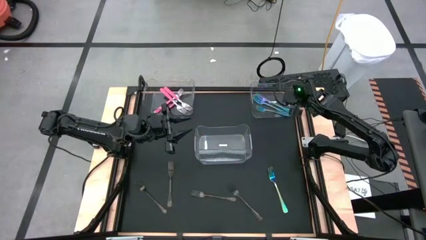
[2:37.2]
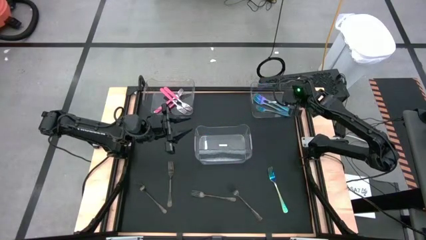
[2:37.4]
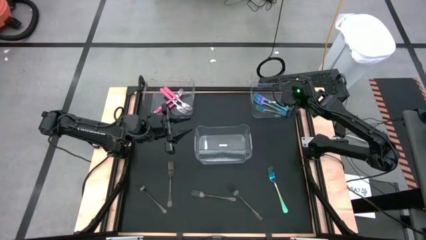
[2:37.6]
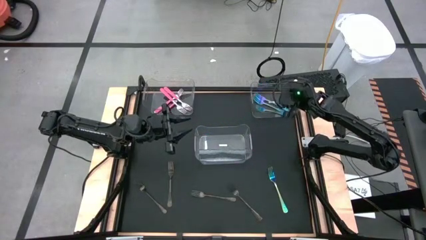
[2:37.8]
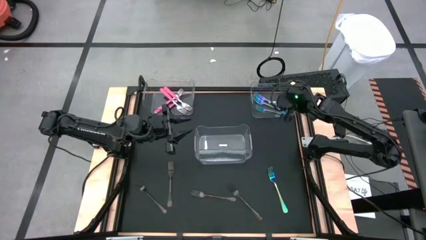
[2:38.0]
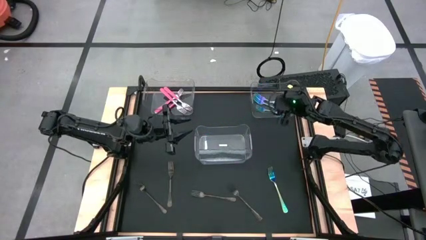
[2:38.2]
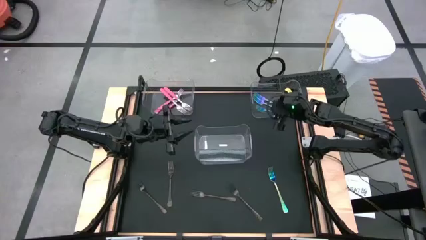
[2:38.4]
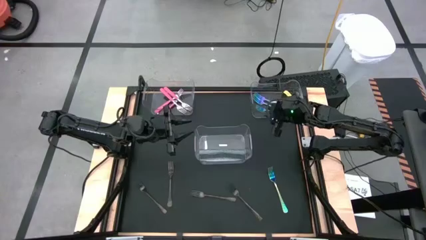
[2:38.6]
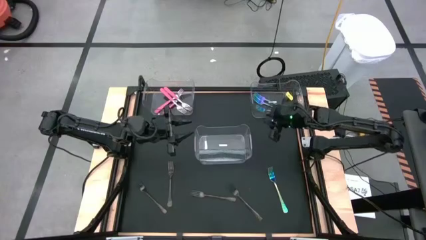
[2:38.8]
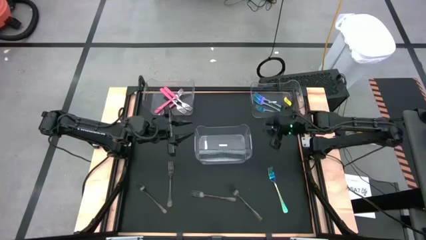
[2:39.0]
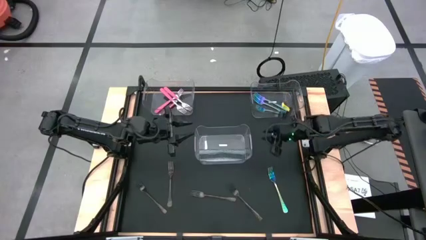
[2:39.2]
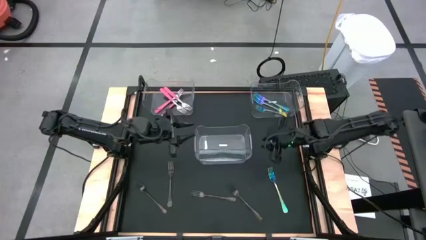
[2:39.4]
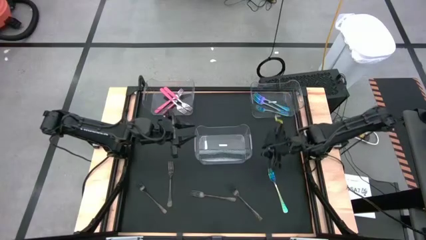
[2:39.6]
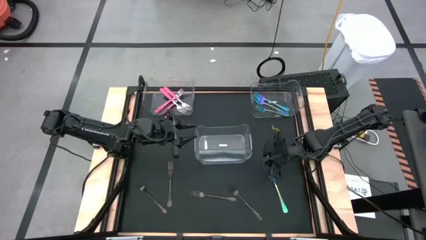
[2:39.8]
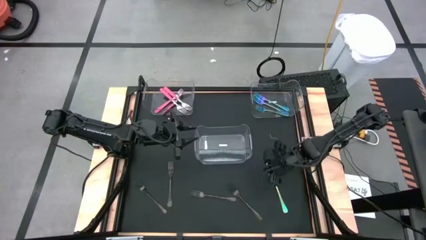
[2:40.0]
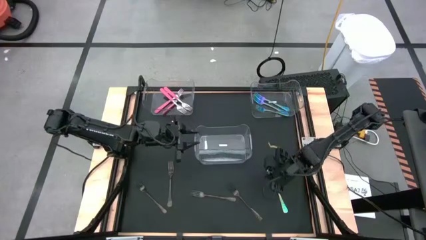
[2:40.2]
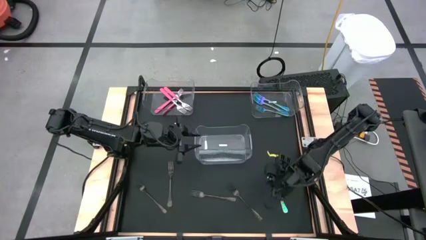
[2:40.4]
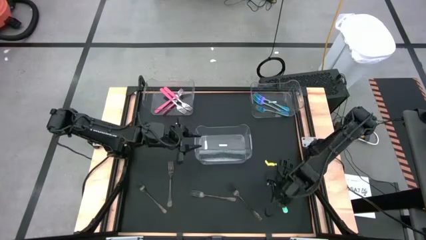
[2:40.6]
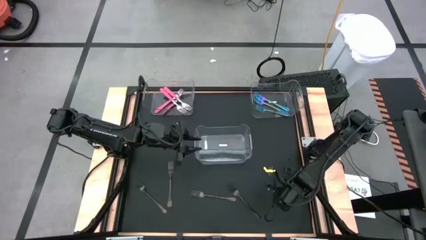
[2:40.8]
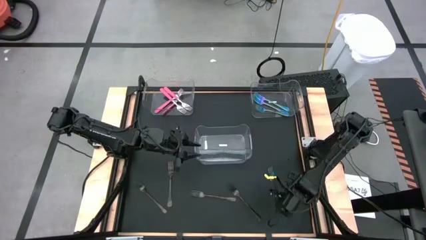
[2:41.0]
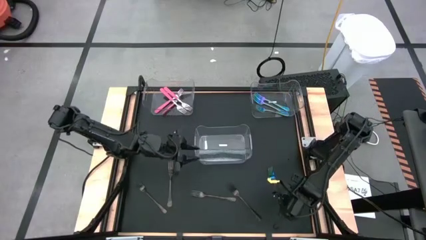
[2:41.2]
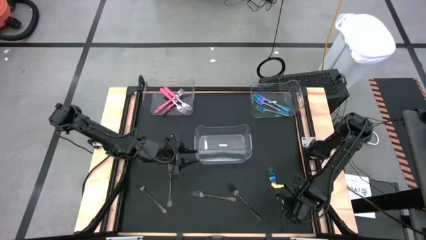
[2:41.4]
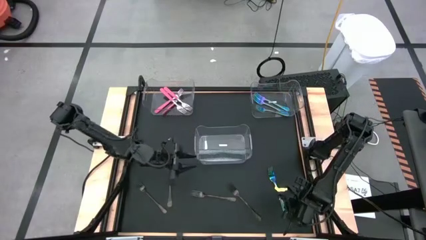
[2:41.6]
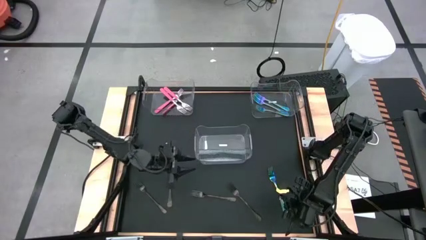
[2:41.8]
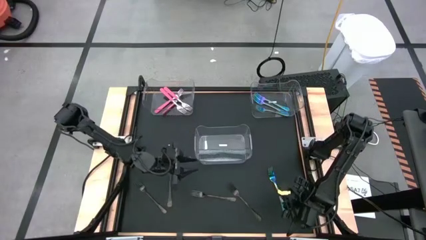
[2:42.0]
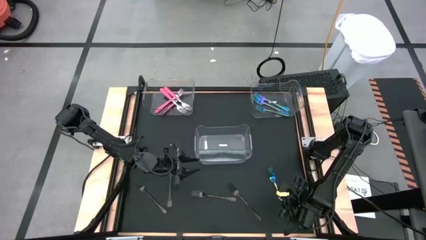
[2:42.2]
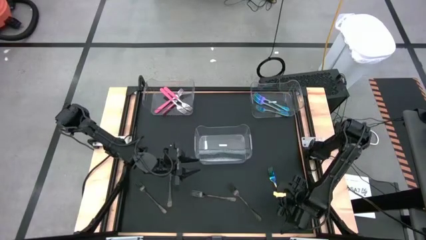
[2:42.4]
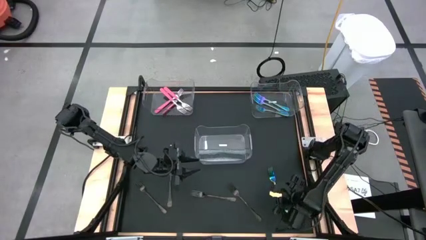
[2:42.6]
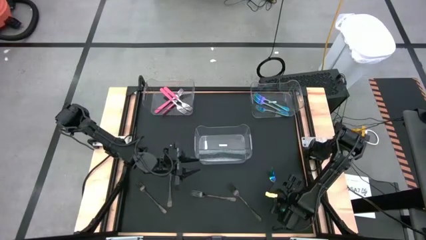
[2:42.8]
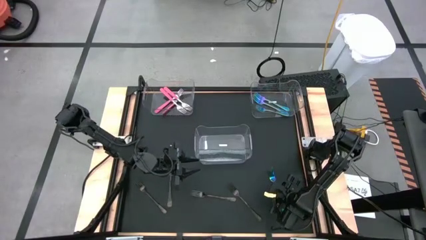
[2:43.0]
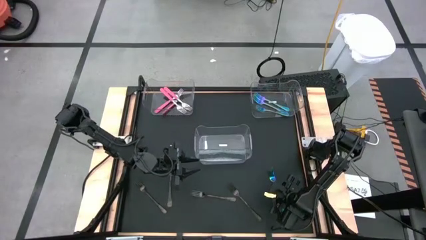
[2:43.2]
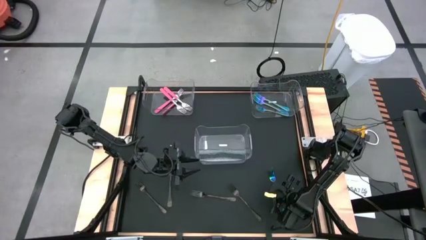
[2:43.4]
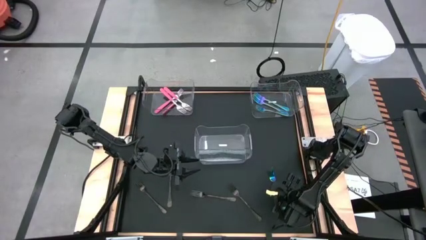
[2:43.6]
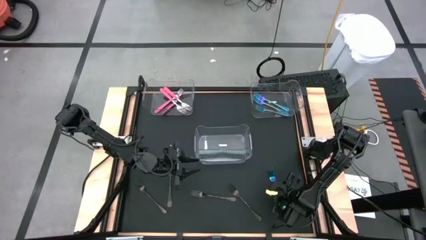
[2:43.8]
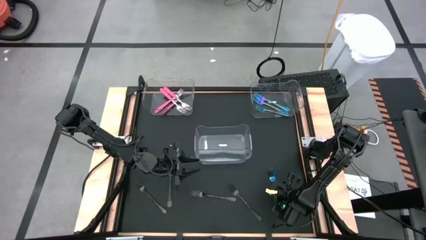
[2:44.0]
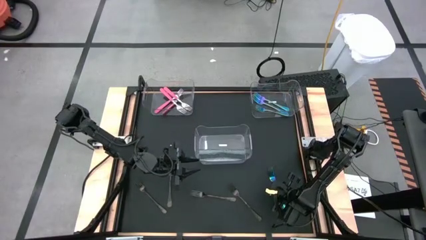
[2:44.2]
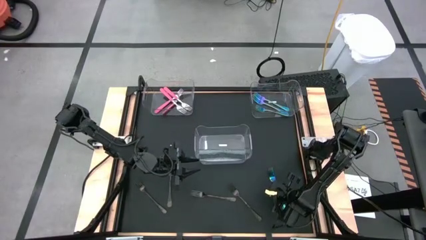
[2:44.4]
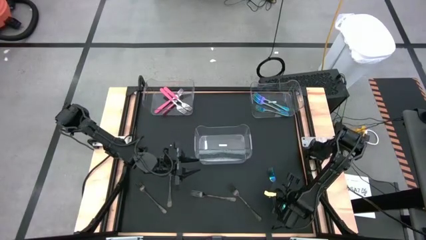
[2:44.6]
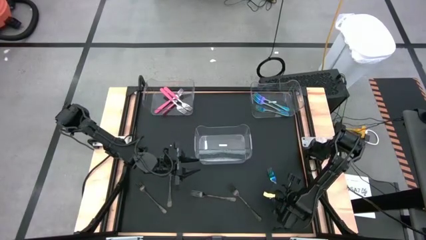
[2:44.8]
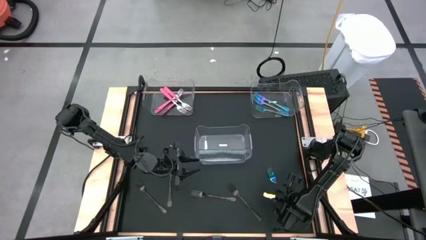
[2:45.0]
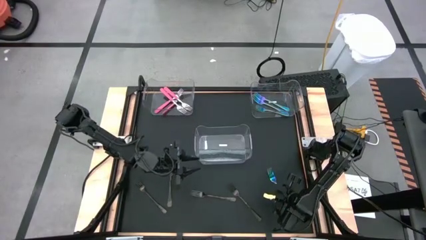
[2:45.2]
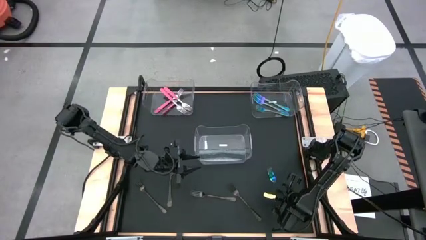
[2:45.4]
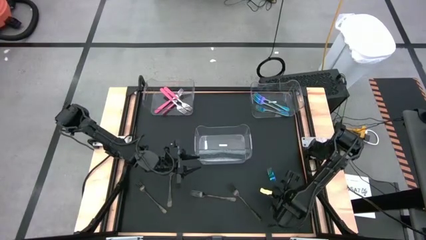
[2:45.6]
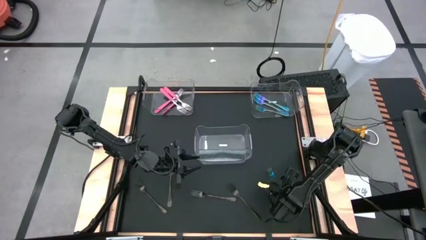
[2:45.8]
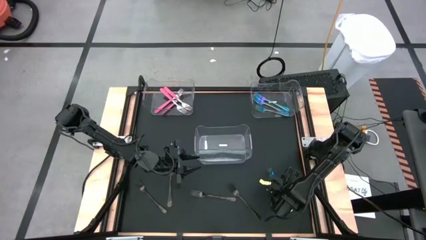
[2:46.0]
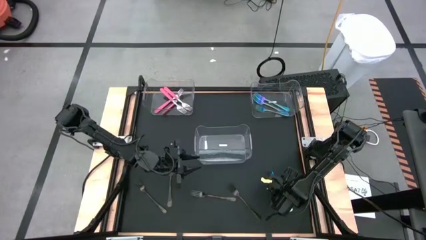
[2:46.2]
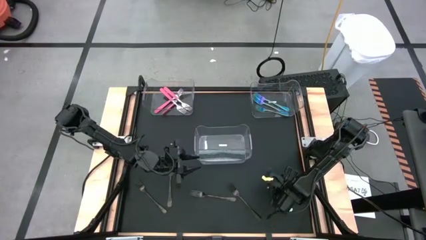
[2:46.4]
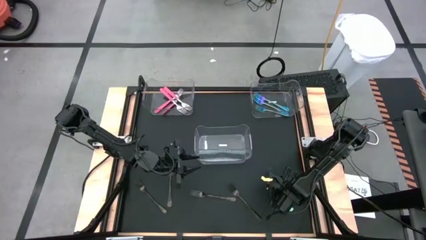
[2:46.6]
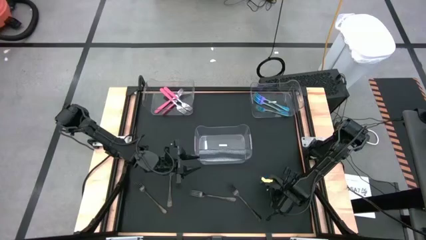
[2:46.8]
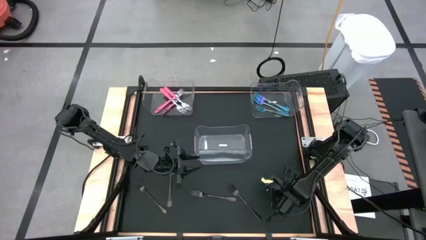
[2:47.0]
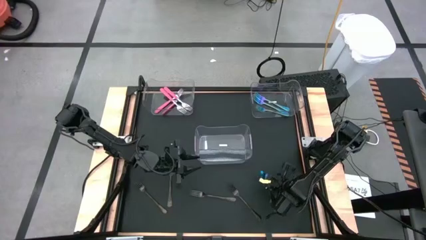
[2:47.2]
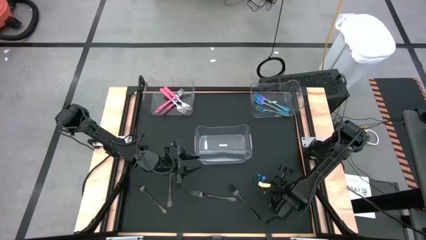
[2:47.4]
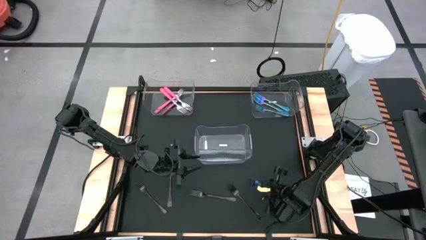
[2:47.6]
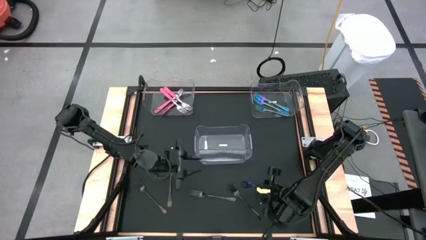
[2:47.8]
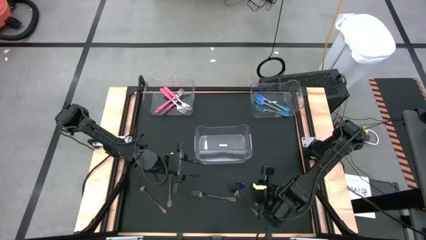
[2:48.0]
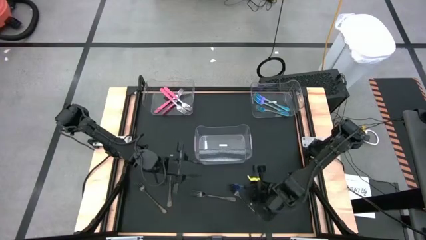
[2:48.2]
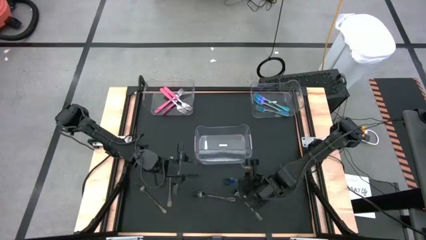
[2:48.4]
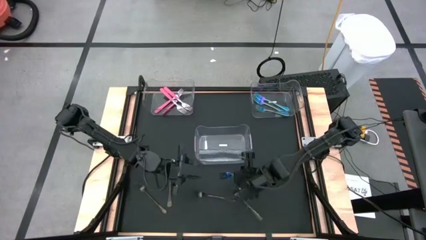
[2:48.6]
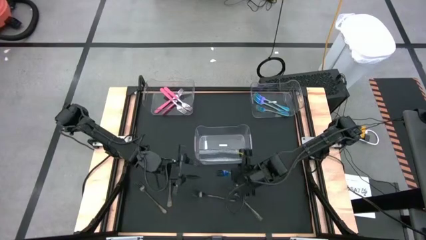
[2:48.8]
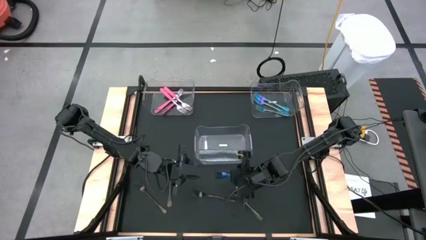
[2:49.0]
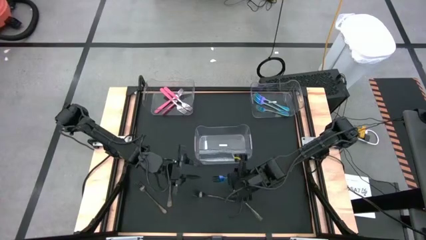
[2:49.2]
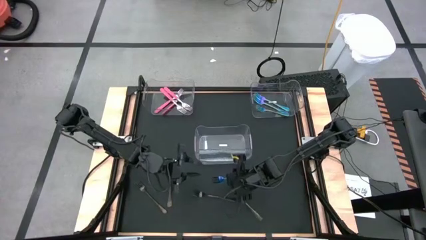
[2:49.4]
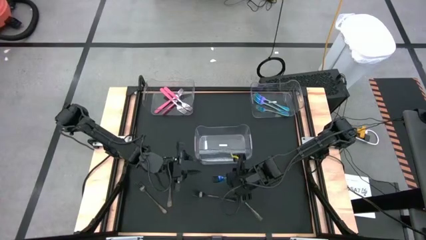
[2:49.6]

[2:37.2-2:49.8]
Task: Sort silverware by color (type)
Put the blue fork into the right transparent bin

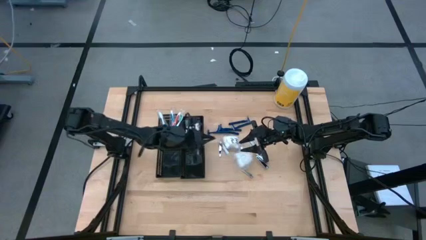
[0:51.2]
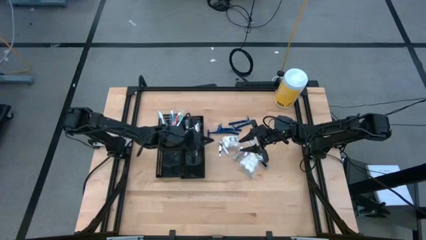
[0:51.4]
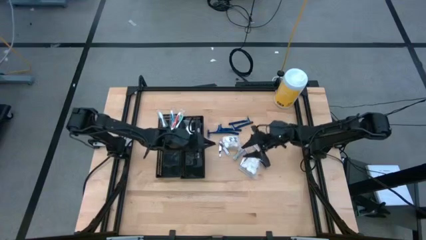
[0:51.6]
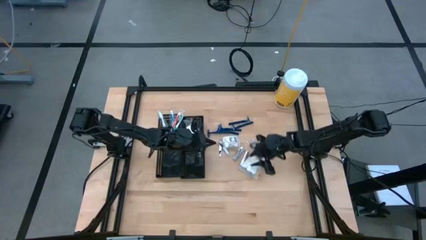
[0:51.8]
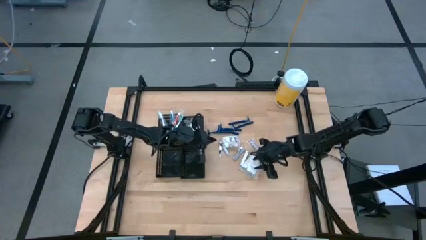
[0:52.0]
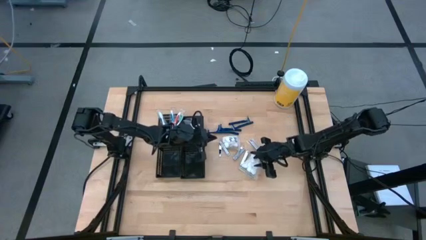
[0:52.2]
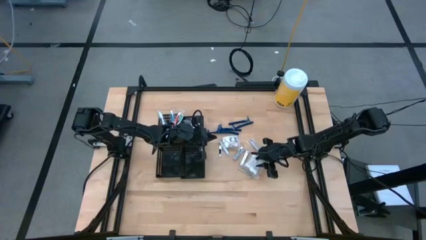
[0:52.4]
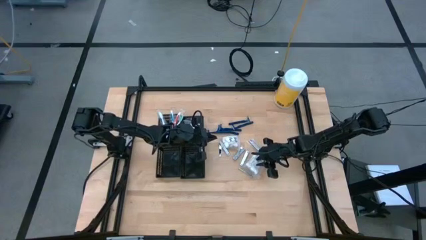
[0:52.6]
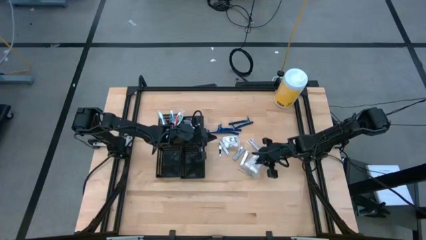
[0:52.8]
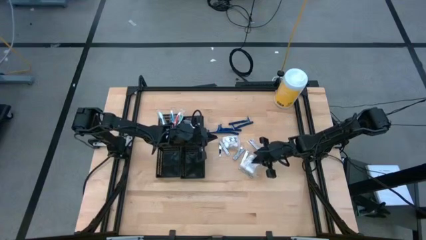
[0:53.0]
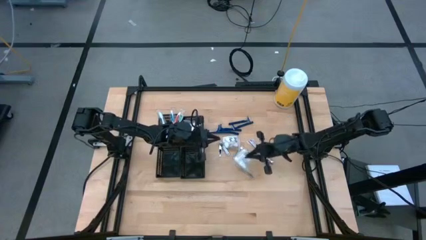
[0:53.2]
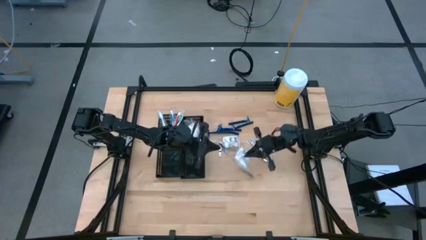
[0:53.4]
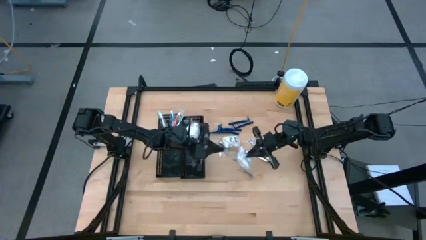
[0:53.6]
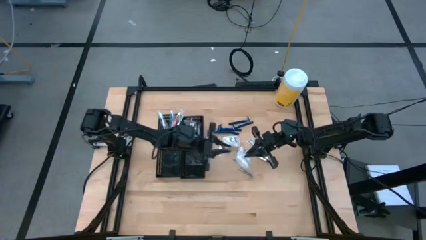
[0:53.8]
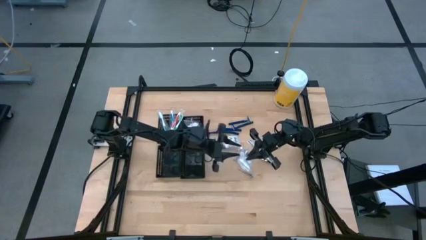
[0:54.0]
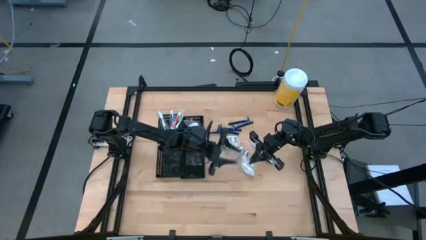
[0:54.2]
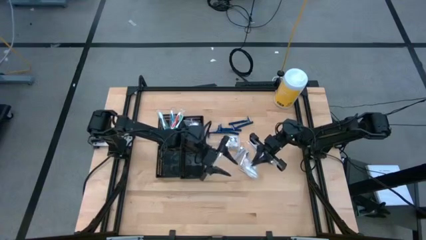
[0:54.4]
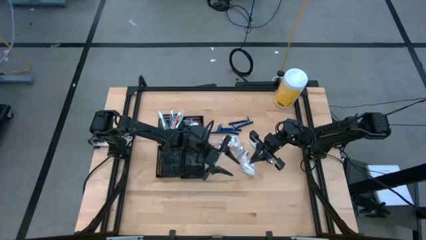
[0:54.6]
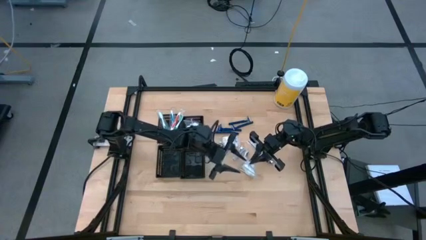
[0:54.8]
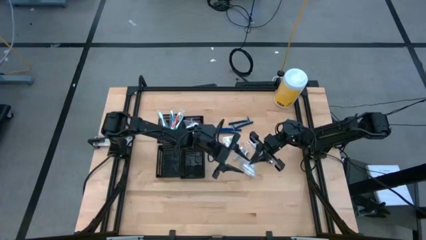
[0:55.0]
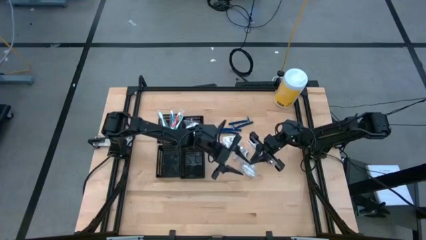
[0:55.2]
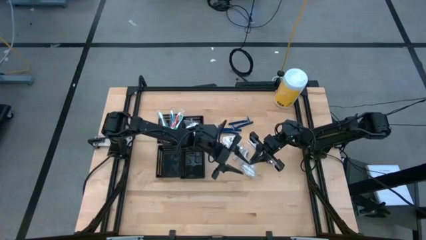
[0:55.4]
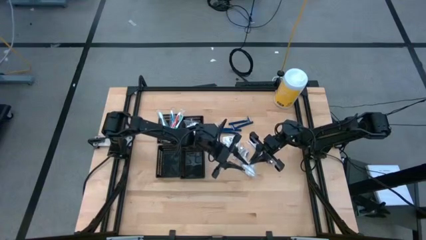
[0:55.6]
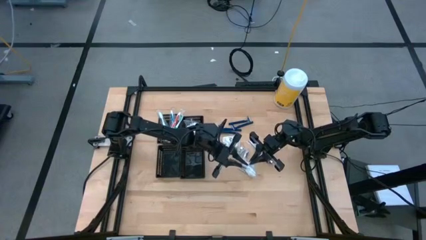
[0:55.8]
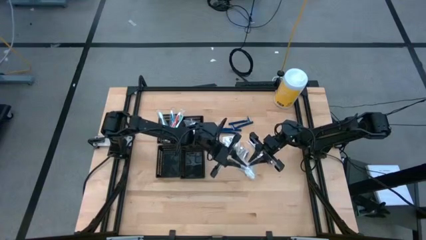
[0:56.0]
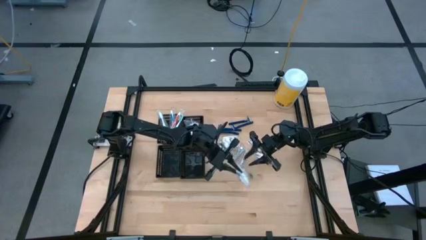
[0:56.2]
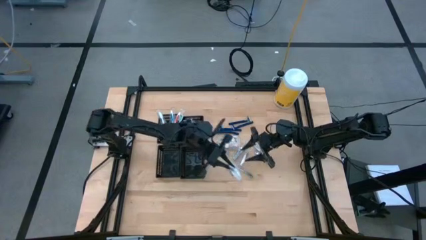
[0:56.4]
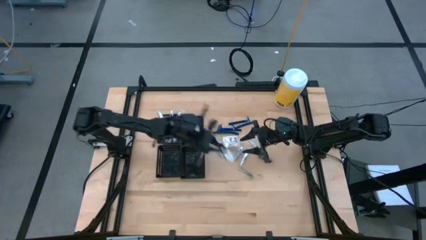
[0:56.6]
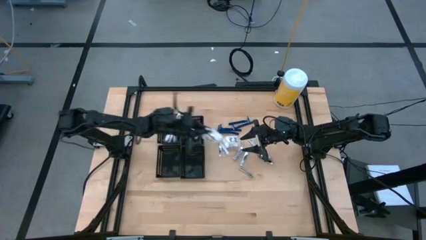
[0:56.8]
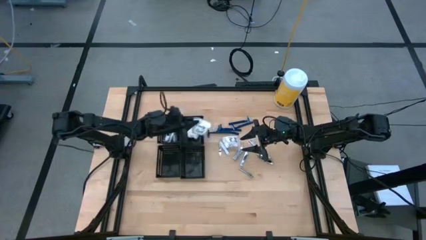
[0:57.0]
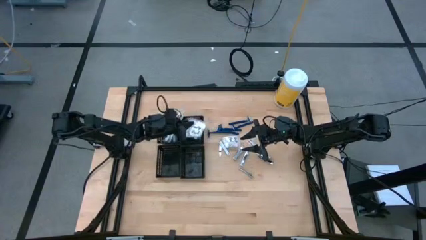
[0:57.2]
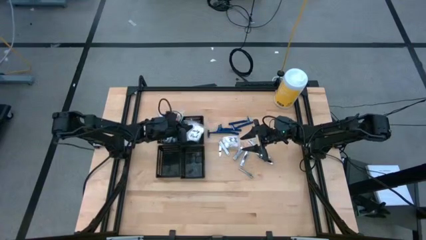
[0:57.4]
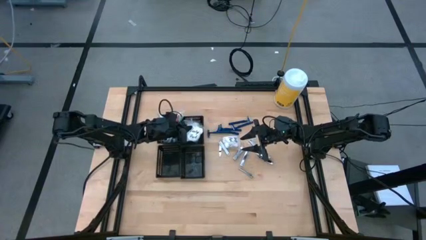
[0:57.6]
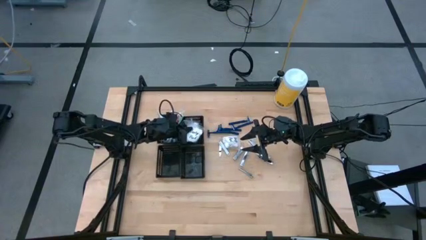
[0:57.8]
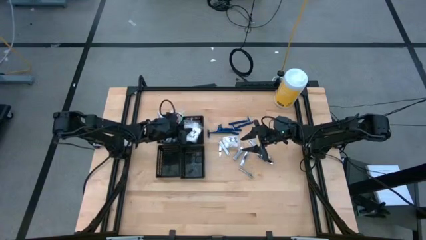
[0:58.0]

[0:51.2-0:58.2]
Task: Pick & Place Travel size toiletries
Put the cotton pack into the top right black bin
